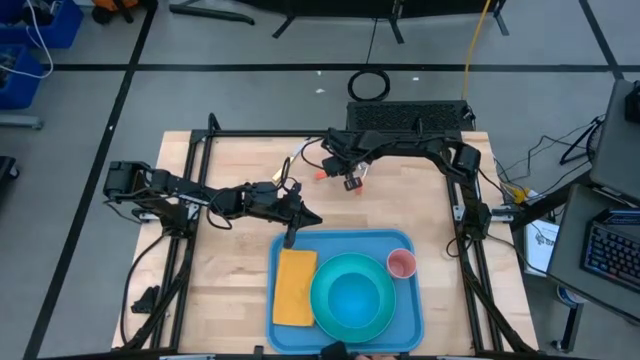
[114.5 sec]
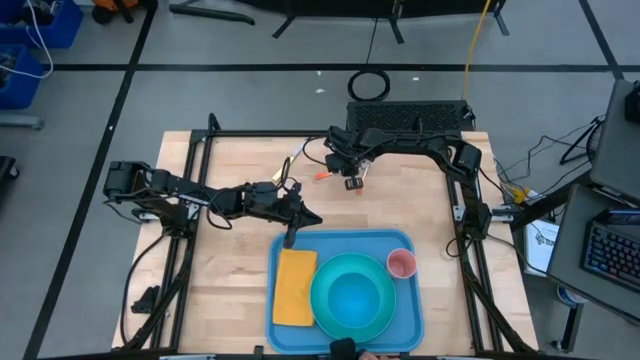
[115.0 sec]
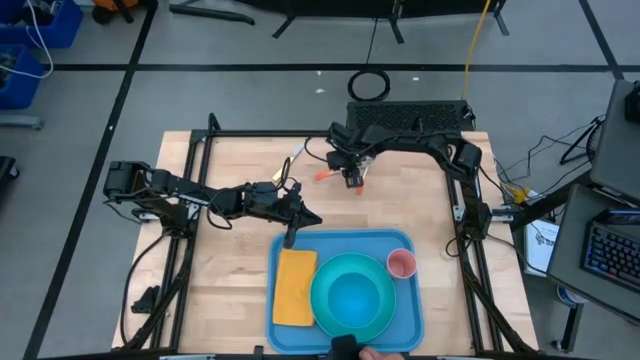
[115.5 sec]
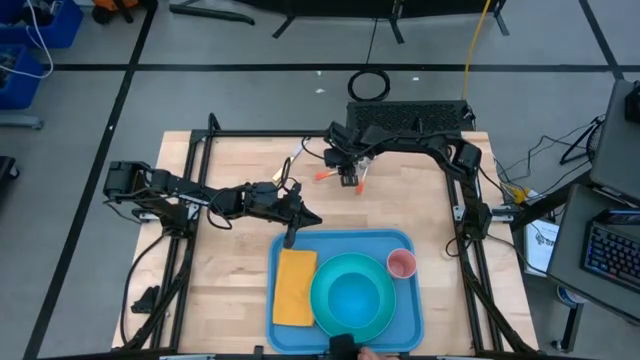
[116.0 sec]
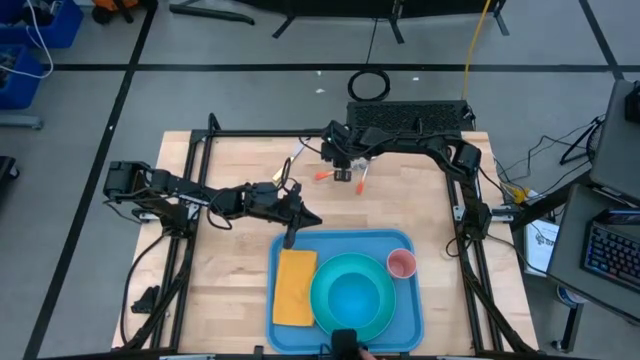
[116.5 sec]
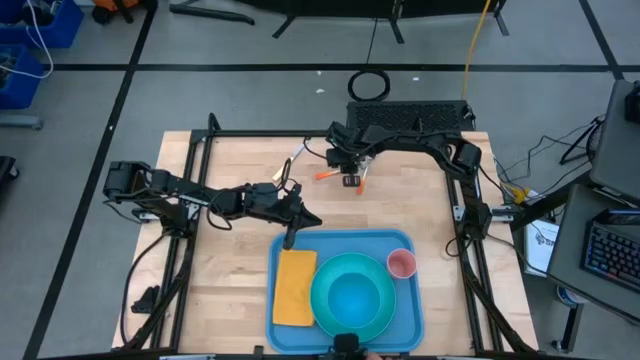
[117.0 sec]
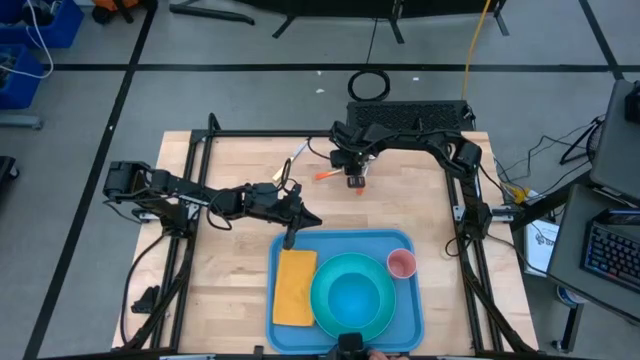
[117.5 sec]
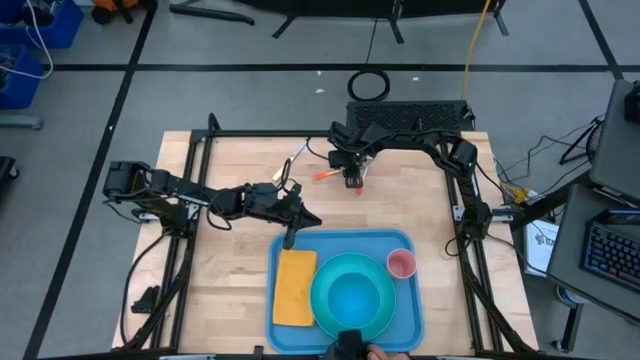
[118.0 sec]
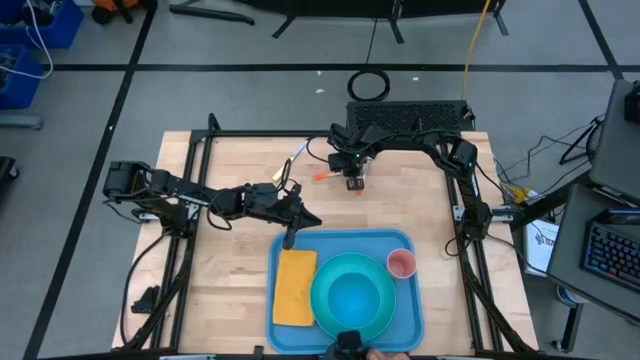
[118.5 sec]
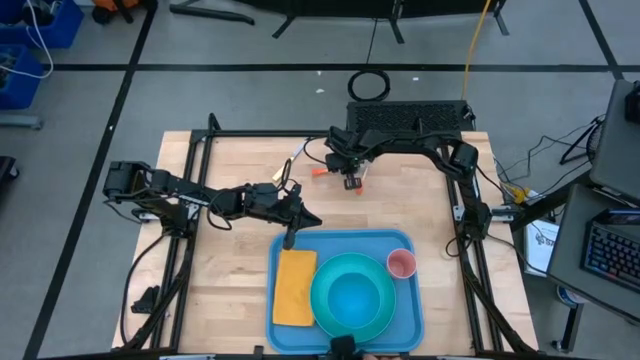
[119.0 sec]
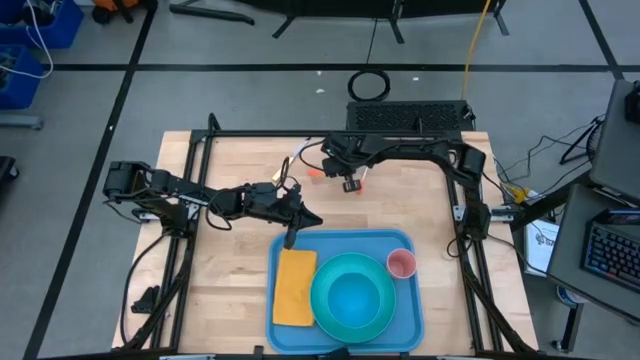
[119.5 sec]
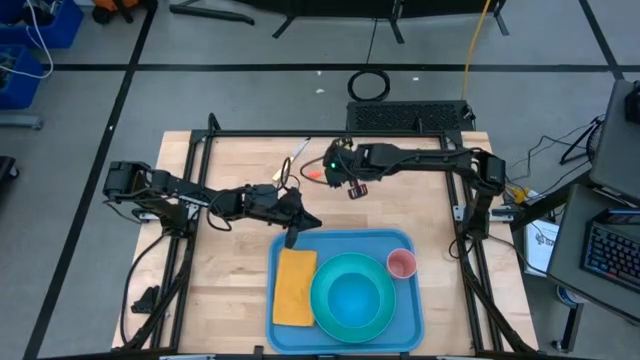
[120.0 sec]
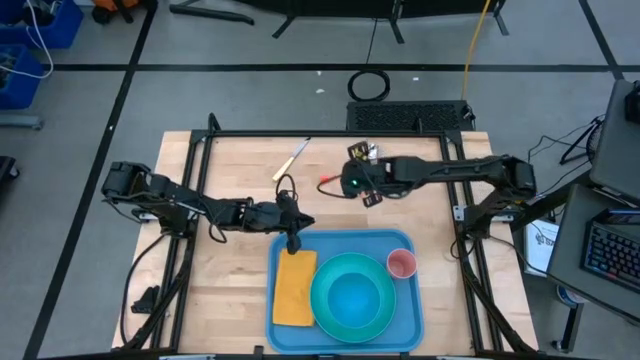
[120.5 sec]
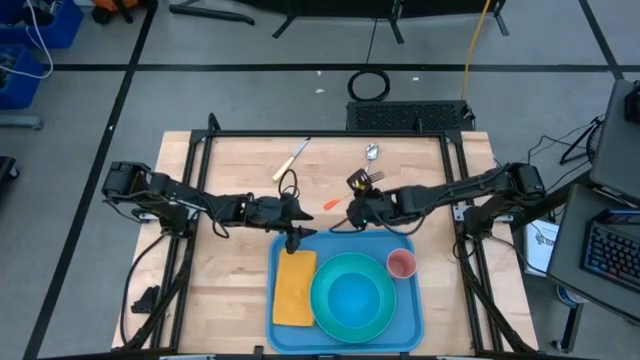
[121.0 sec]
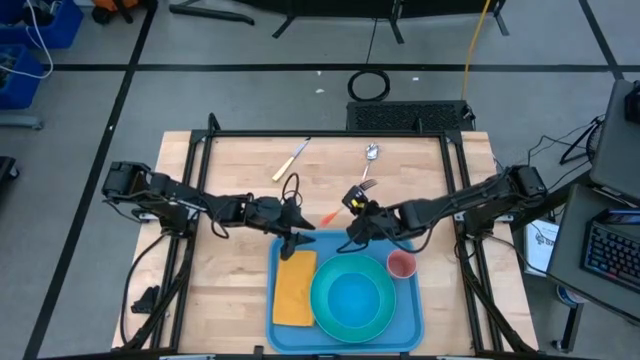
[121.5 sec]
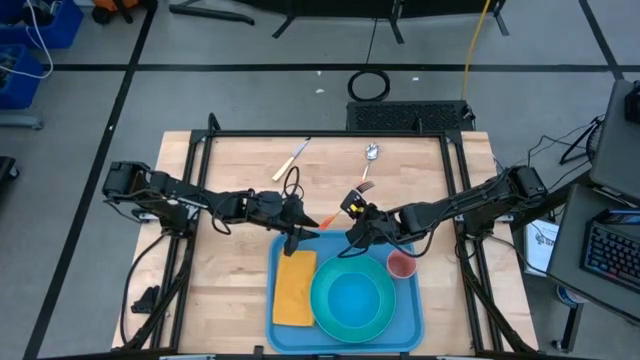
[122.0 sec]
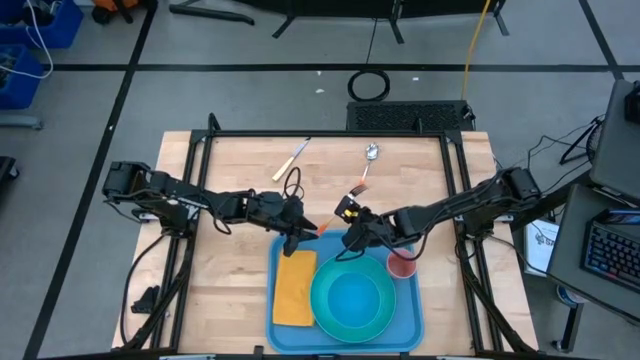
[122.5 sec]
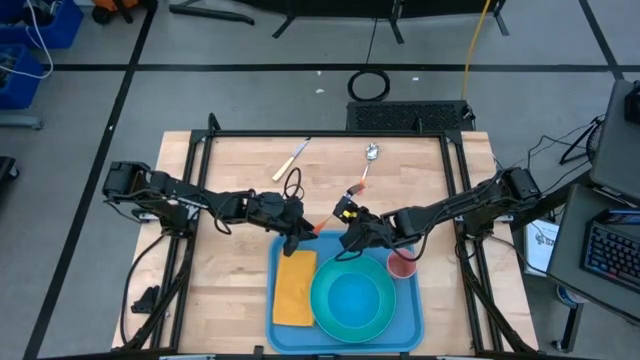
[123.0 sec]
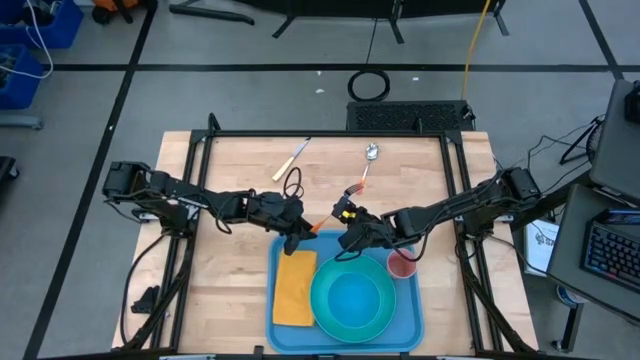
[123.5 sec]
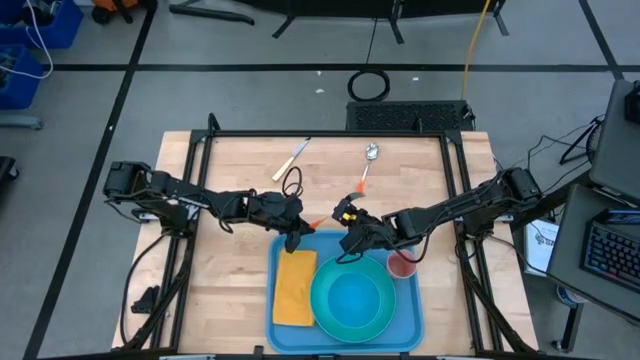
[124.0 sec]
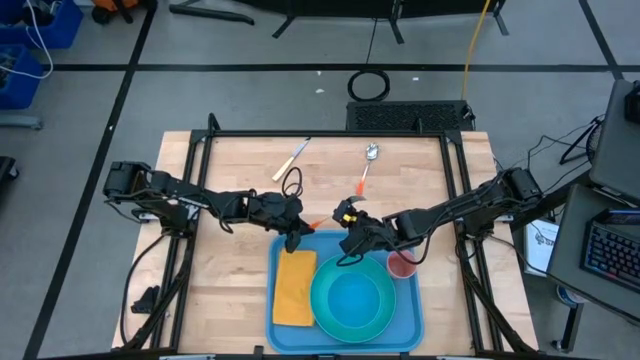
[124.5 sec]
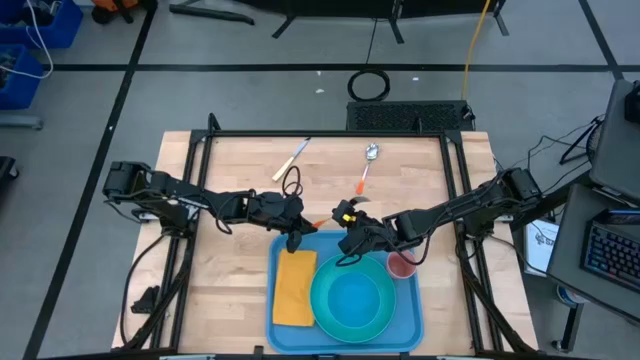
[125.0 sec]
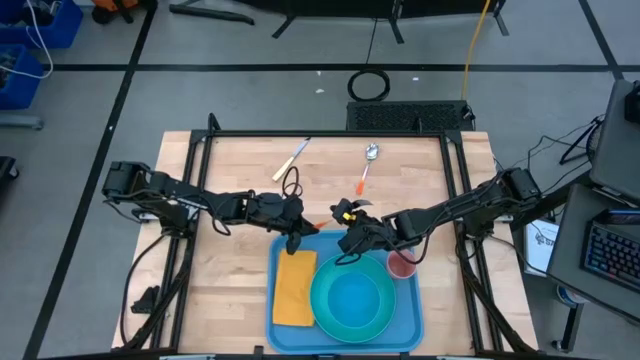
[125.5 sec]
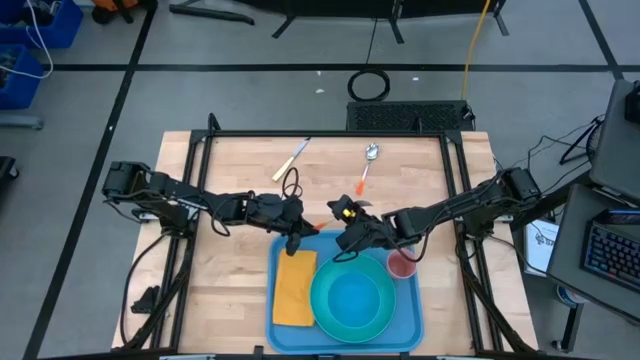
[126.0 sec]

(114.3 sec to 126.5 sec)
Task: Set up tray
Put the orange fork on top of the yellow table napkin

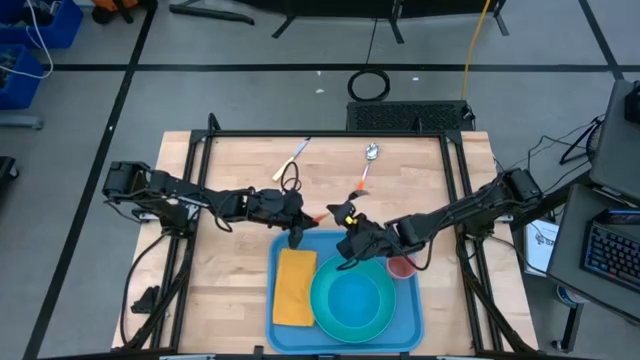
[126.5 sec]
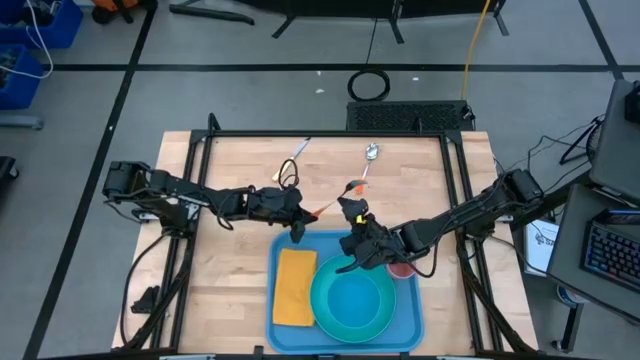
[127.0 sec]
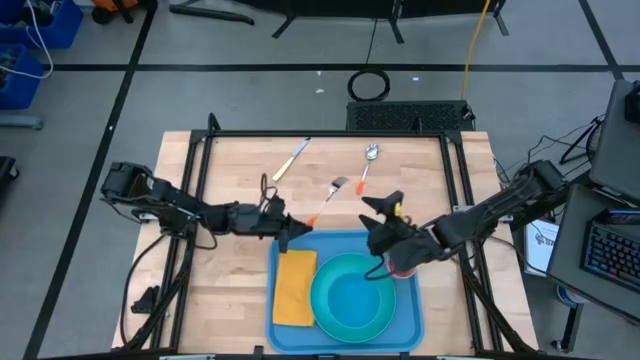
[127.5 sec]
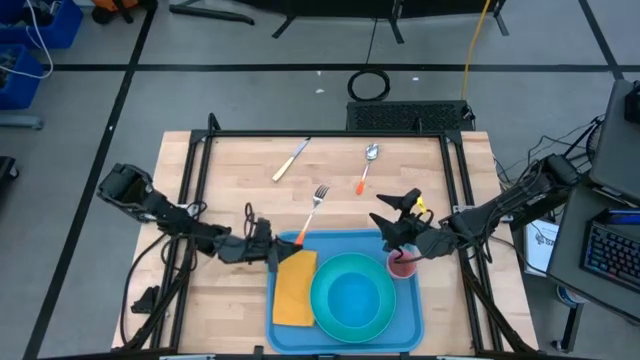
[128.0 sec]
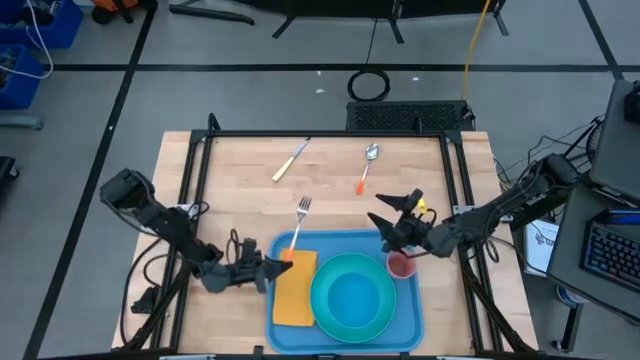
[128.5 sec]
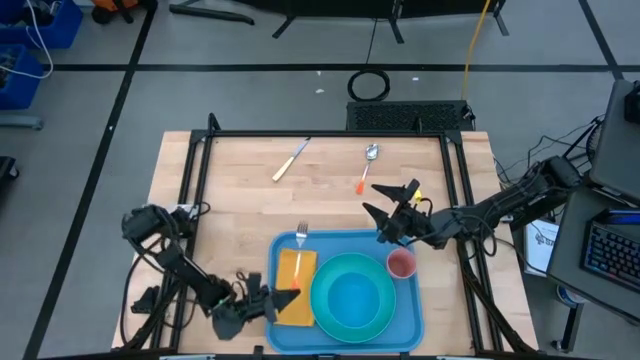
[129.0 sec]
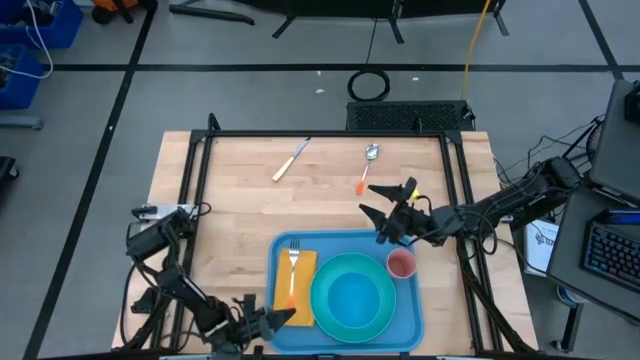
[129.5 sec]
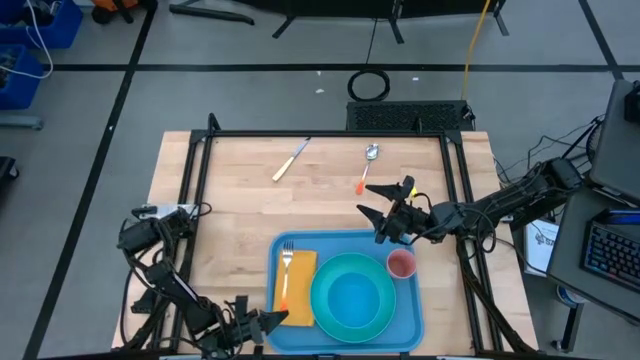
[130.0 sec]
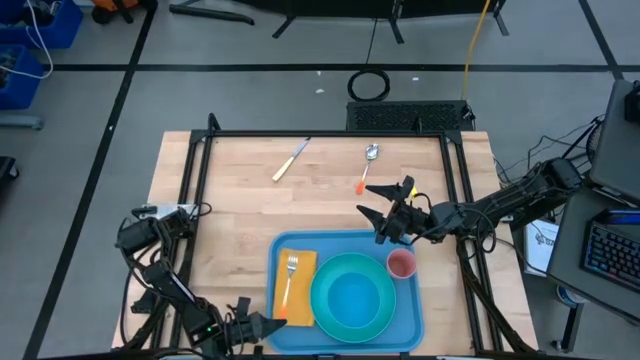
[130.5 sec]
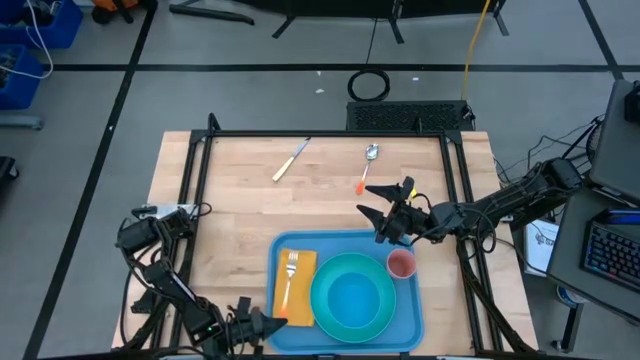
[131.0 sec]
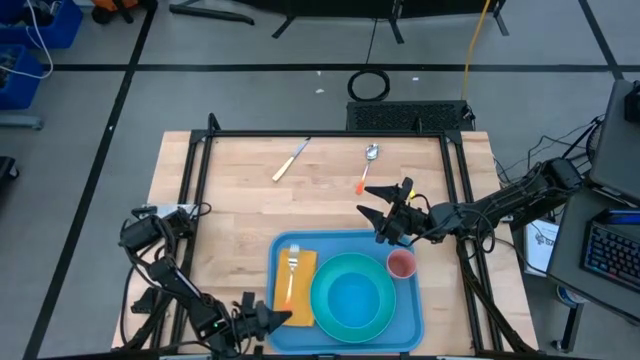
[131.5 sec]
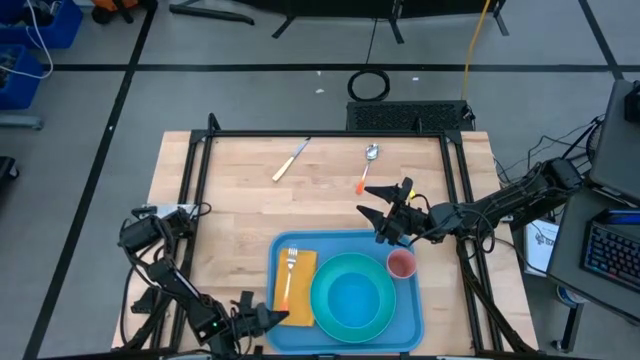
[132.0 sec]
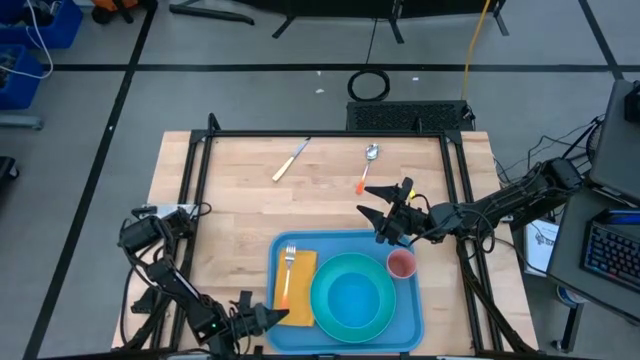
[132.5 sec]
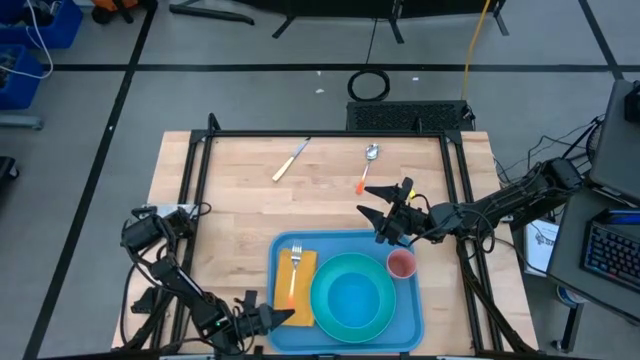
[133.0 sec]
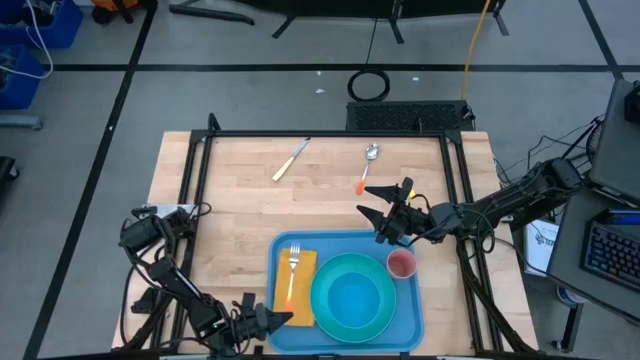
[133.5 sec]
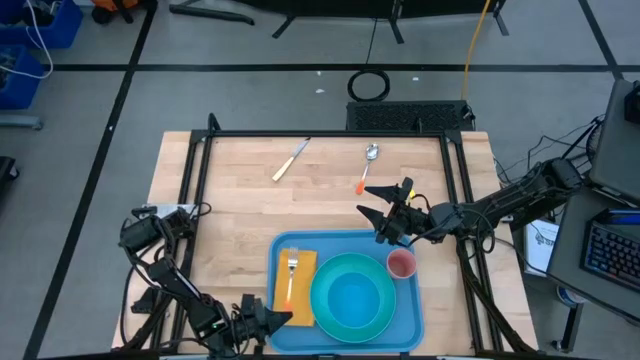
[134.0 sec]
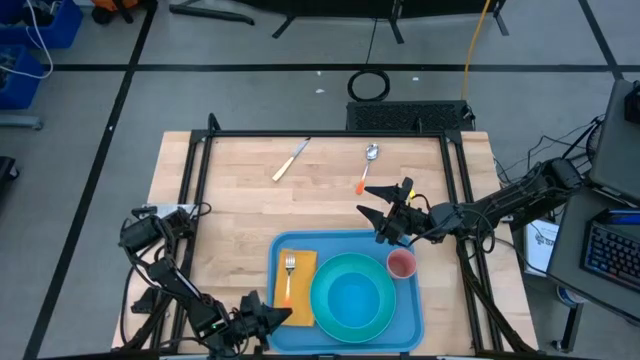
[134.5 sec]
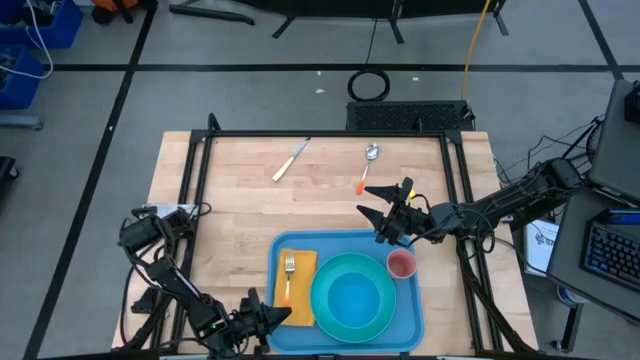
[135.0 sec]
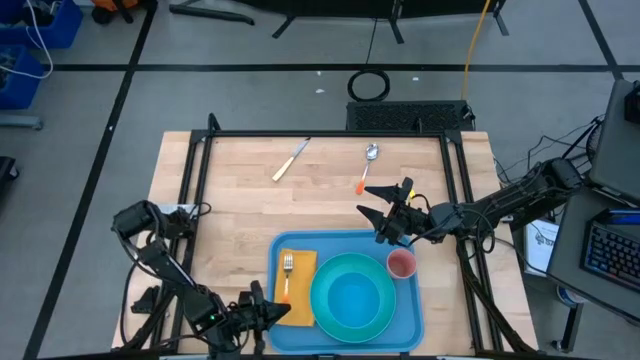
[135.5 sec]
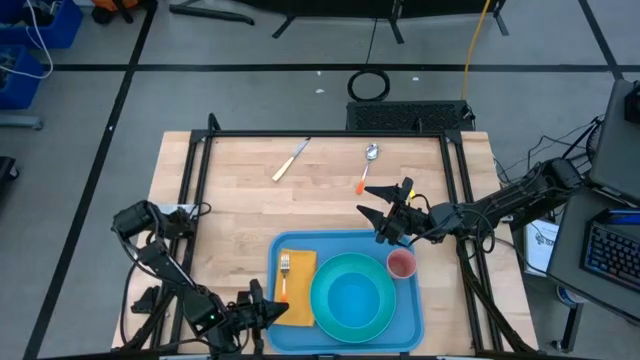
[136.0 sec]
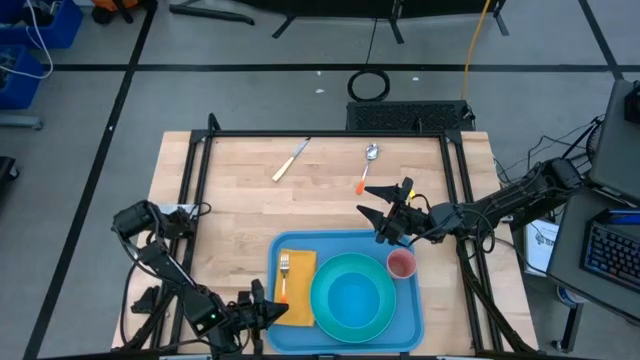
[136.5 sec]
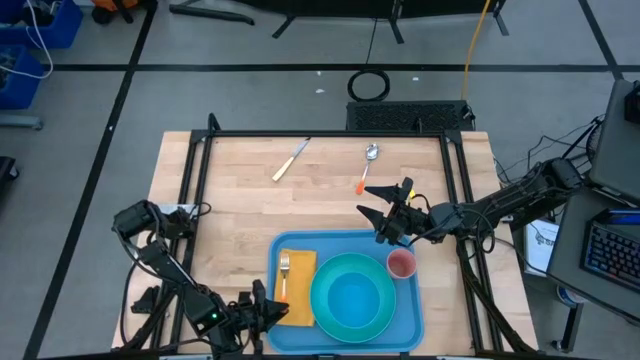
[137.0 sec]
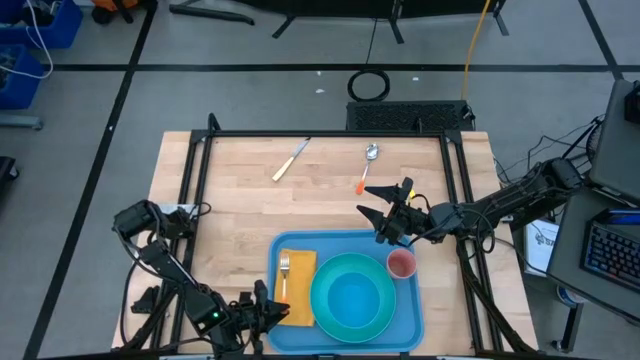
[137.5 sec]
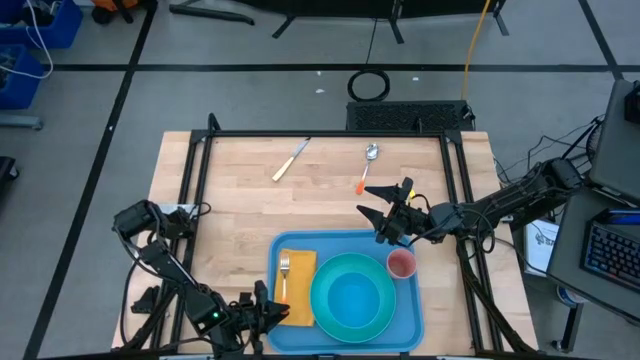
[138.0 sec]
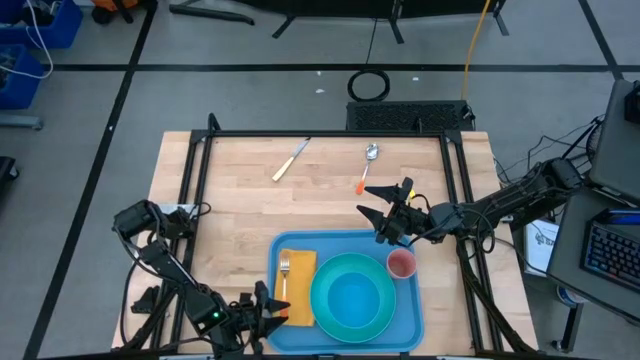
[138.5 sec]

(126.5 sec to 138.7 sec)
Put the orange fork on top of the yellow table napkin
